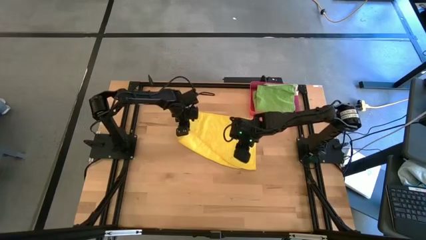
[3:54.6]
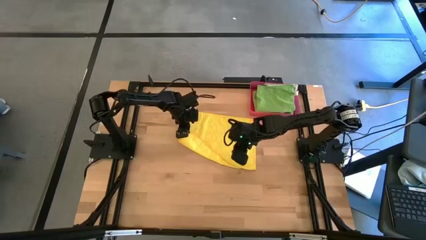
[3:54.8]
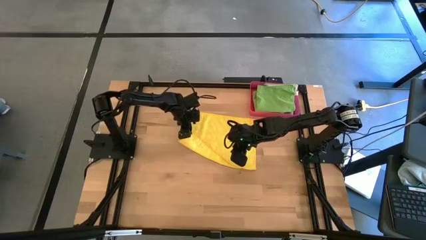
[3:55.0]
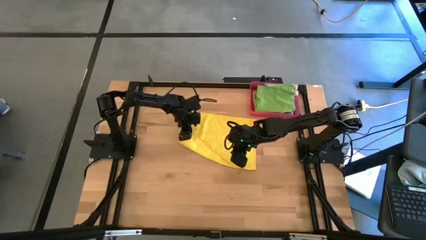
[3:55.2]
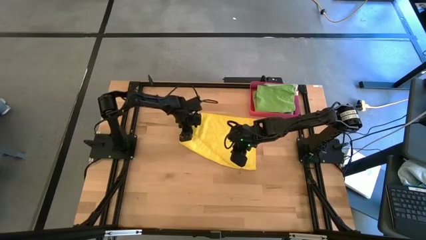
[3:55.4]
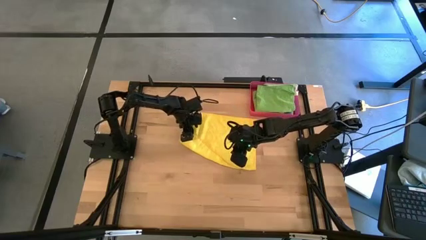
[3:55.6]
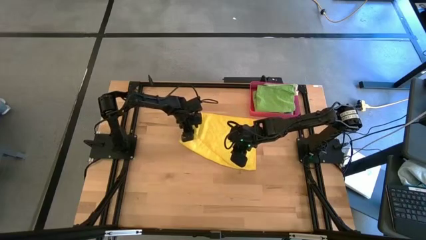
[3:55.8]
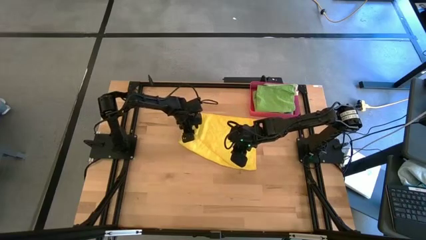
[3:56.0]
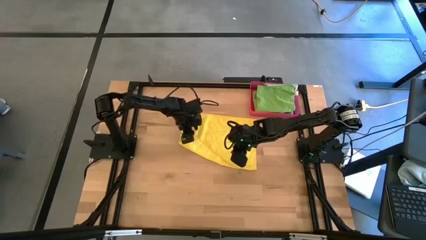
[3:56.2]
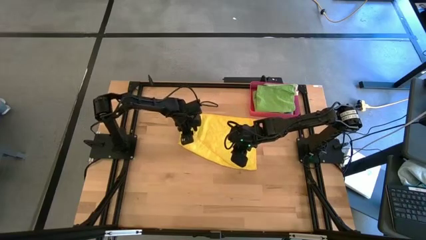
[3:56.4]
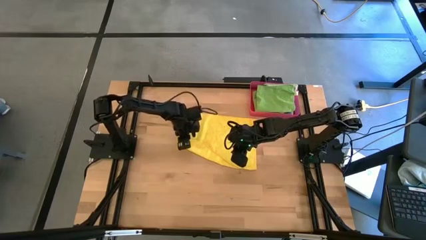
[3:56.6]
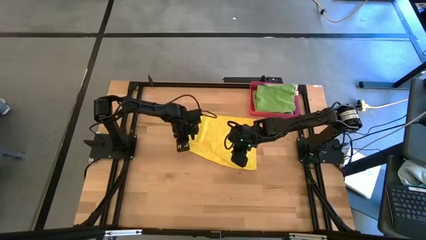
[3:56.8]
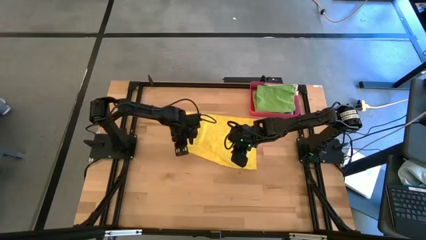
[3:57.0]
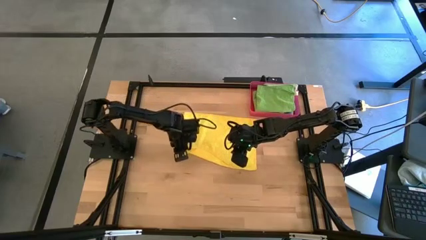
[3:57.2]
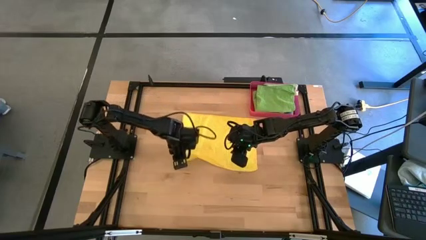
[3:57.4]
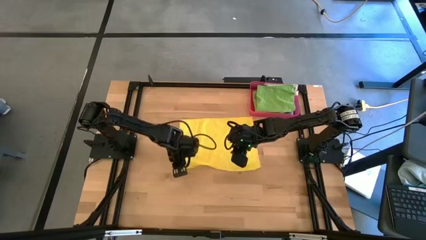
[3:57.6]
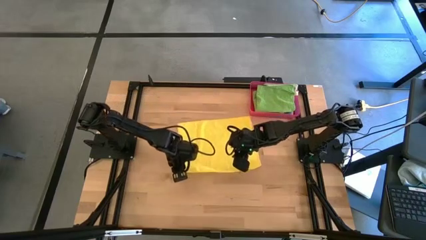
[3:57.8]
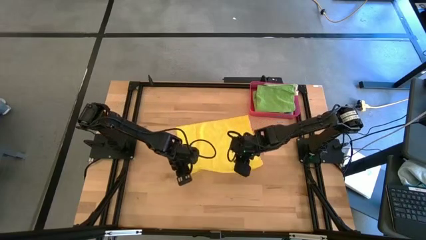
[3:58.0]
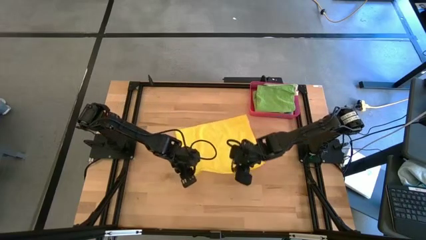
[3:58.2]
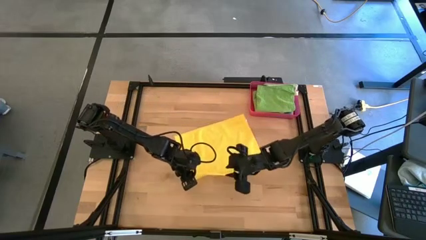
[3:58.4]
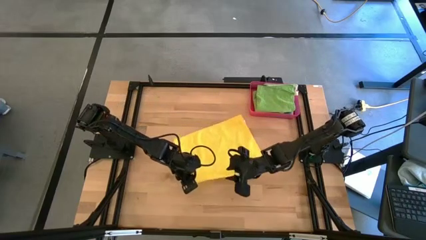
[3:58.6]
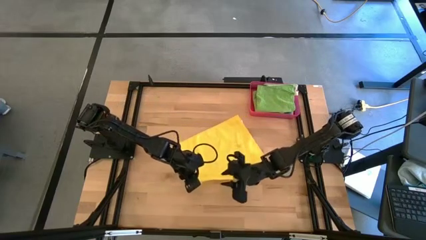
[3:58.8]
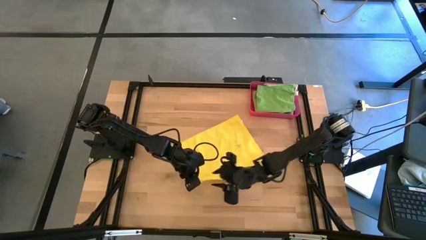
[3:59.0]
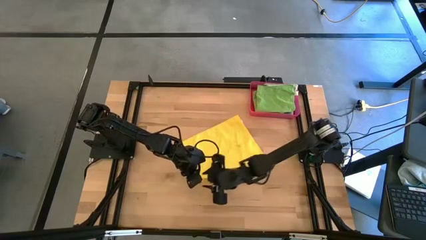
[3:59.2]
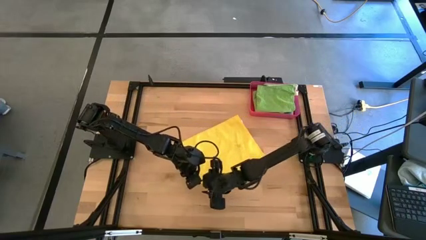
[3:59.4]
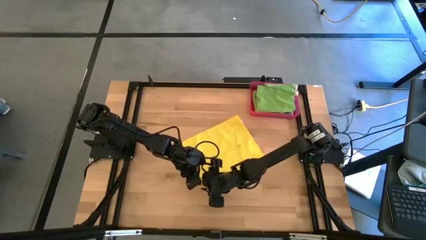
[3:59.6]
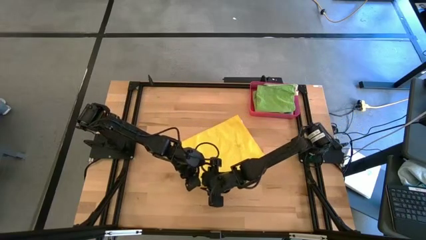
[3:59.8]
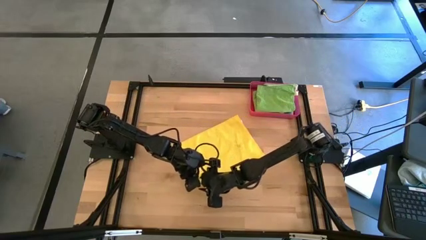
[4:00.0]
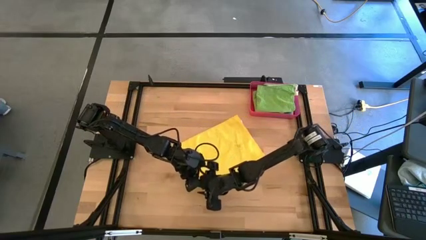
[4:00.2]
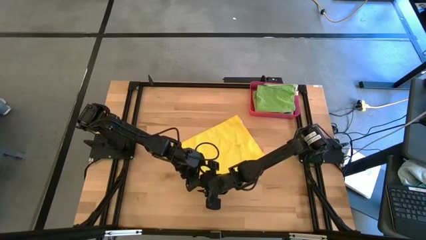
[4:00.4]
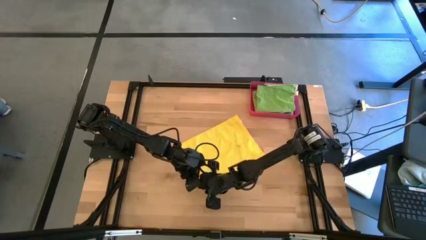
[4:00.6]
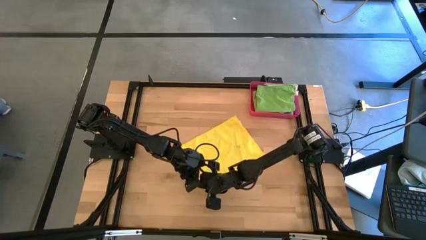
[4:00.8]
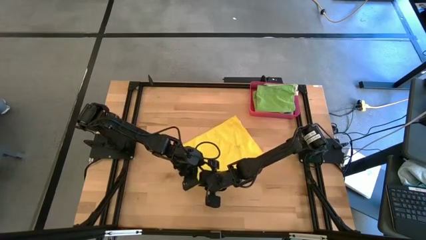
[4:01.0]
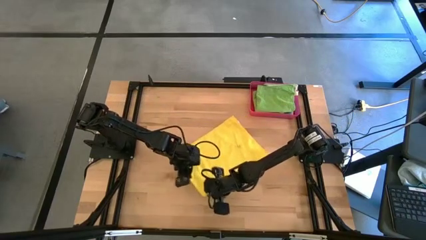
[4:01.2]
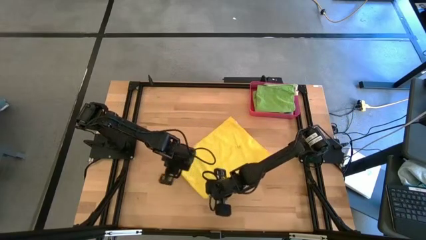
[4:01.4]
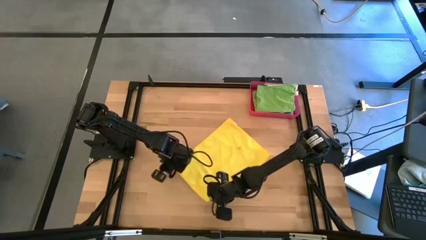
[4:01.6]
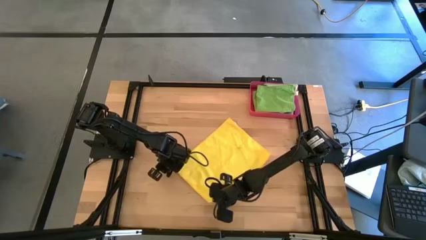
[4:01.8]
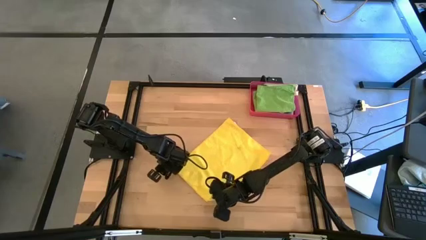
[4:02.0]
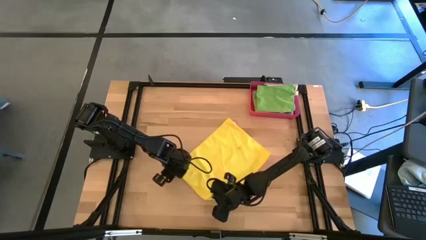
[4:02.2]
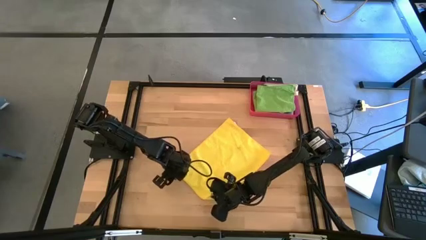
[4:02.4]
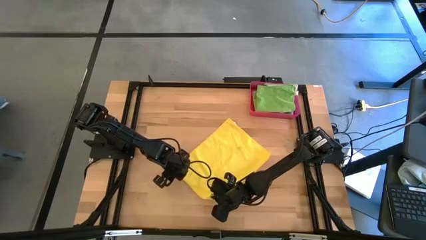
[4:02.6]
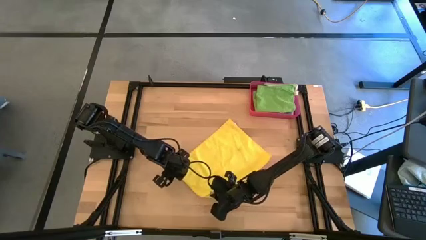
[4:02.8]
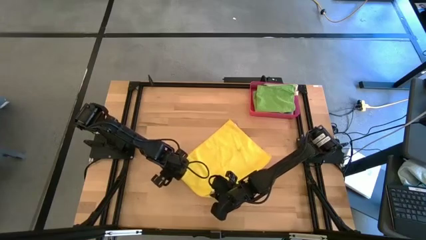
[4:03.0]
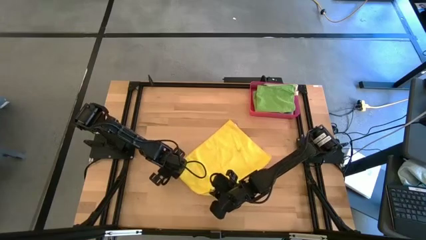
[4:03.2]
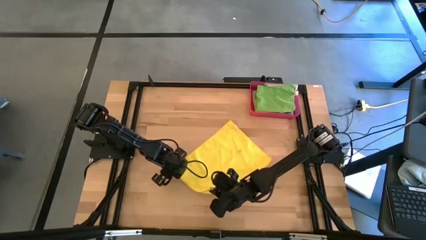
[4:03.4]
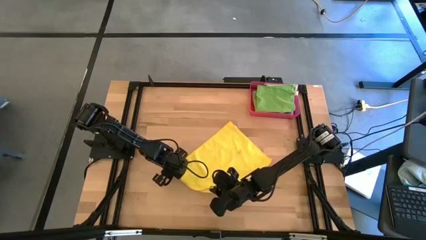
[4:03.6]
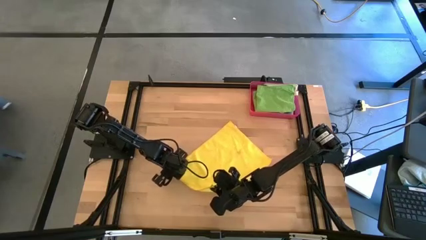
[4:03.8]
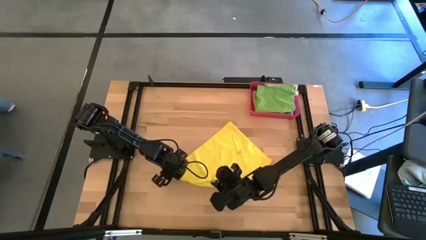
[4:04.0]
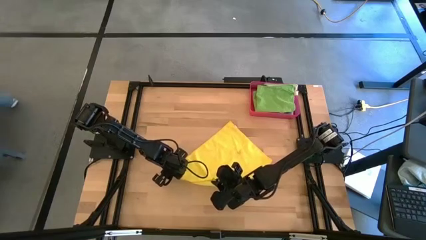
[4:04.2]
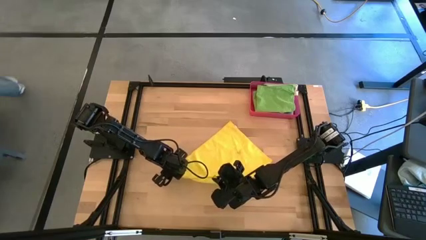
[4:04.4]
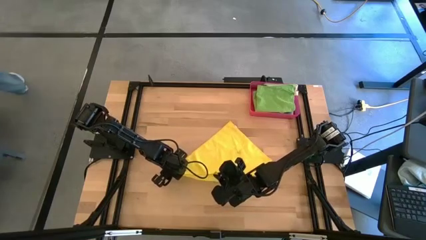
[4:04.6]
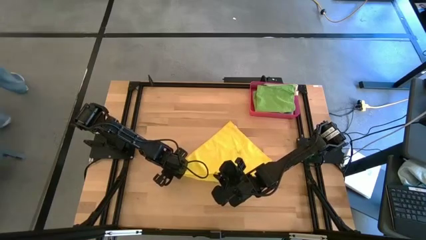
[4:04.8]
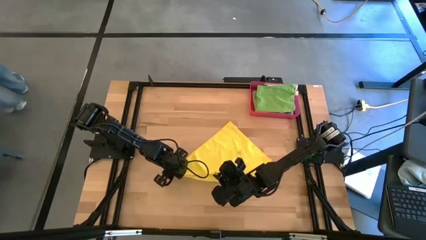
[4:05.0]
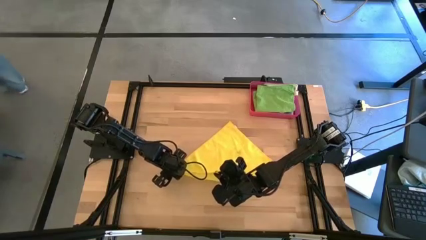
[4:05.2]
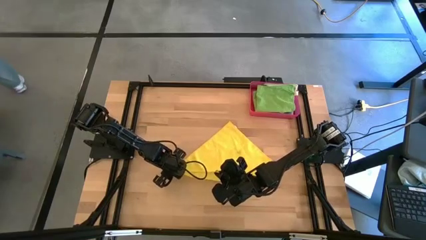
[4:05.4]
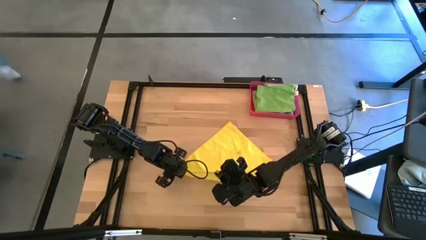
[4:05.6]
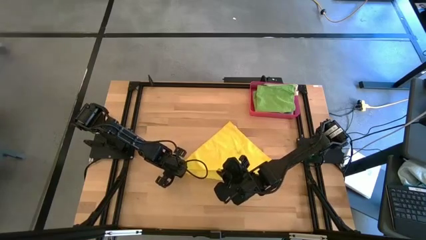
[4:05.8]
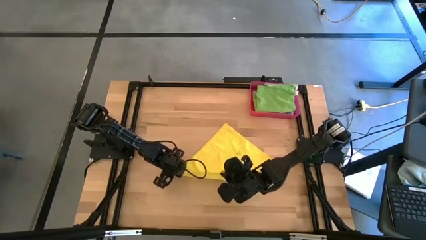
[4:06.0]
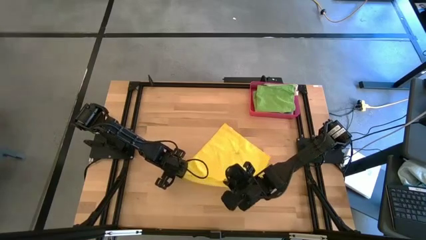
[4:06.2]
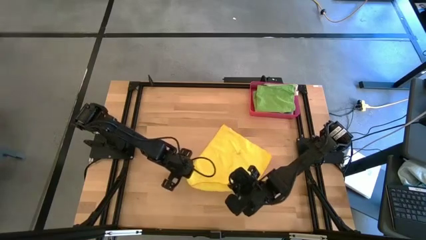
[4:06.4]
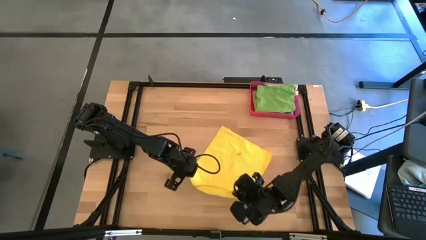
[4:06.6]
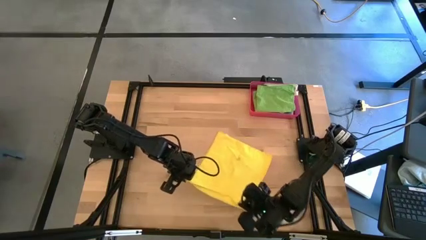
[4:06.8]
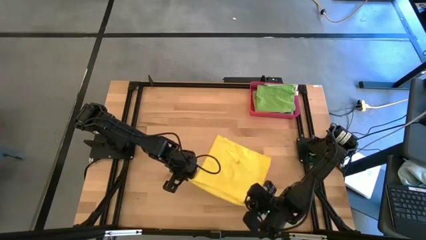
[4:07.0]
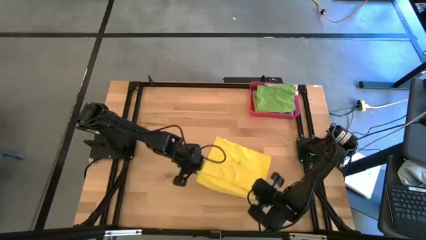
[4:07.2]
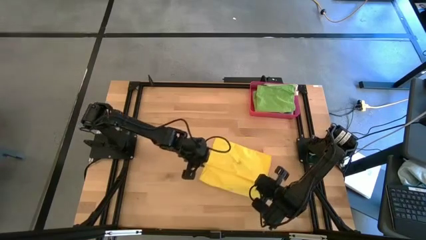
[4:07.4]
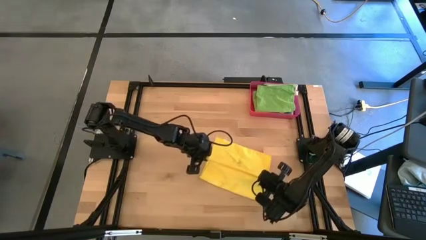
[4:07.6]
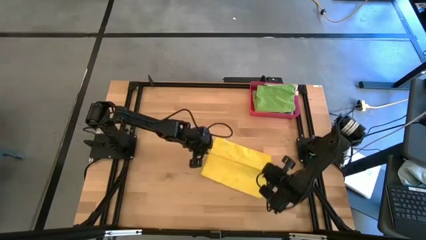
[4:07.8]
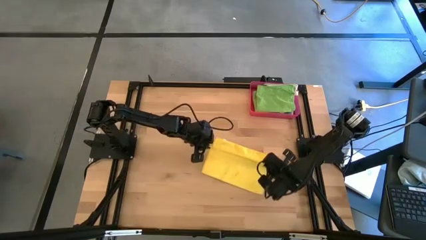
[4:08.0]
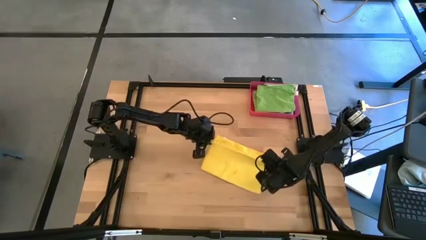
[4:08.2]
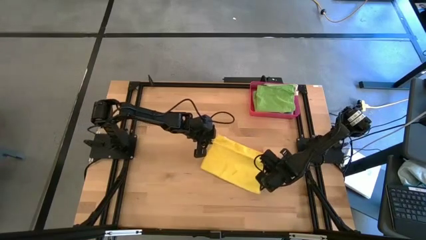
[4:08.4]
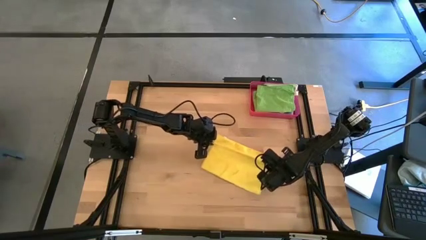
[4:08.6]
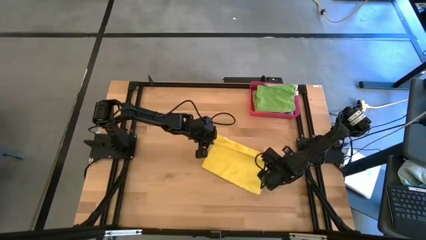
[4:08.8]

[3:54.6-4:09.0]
Task: Fold microfiber towels
Fold the yellow towel

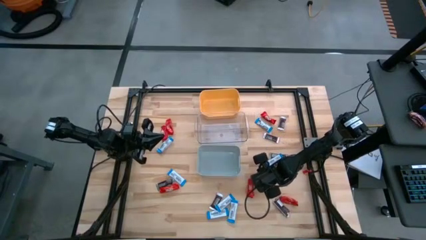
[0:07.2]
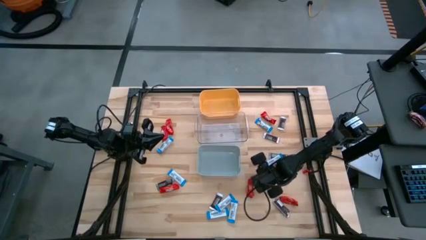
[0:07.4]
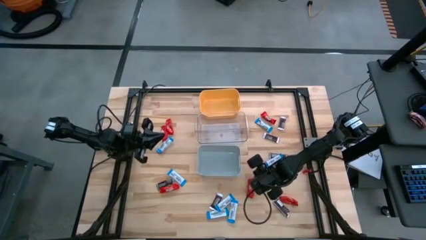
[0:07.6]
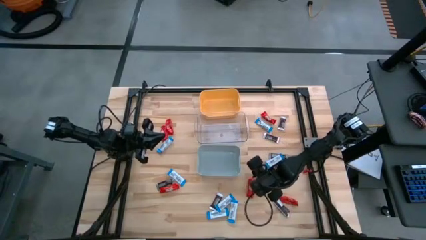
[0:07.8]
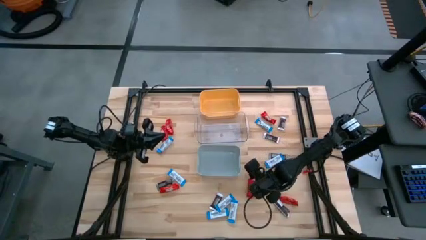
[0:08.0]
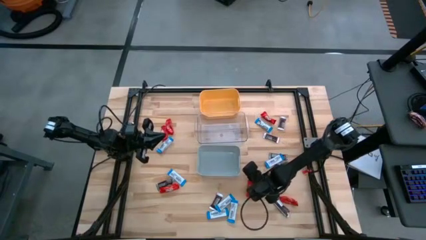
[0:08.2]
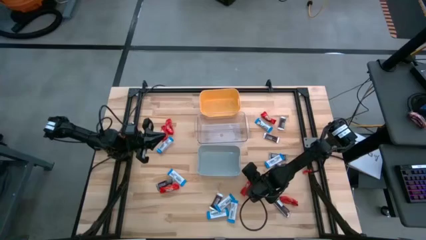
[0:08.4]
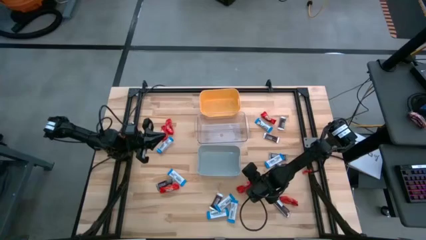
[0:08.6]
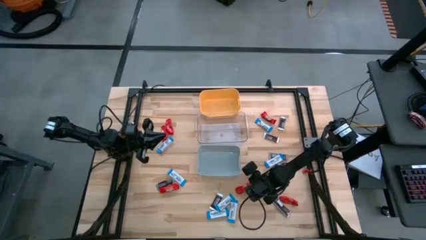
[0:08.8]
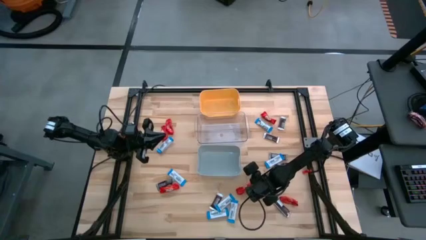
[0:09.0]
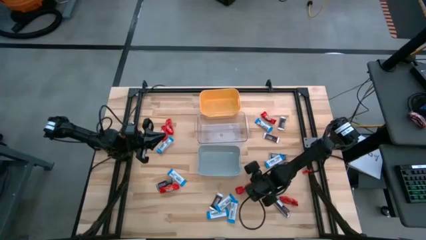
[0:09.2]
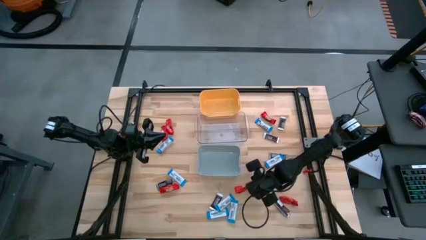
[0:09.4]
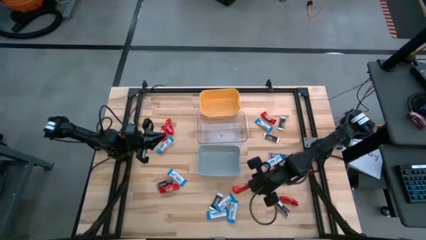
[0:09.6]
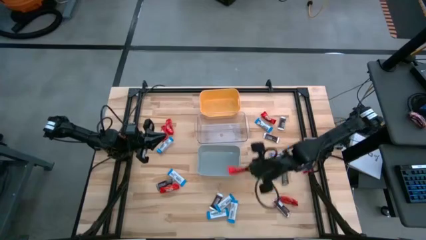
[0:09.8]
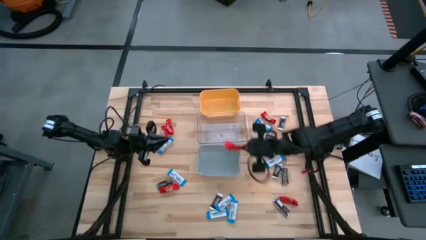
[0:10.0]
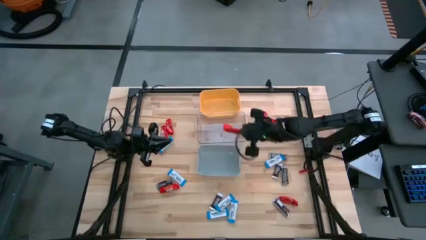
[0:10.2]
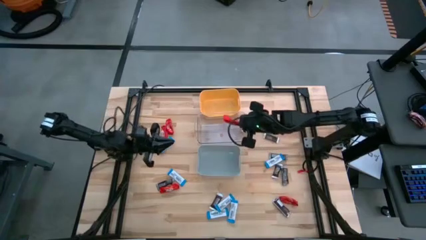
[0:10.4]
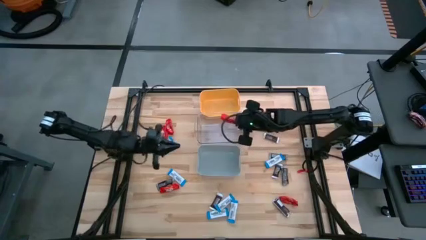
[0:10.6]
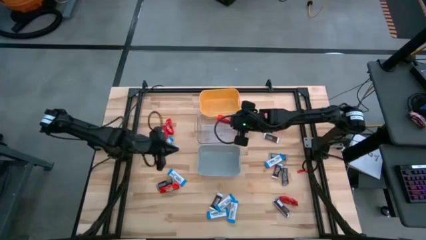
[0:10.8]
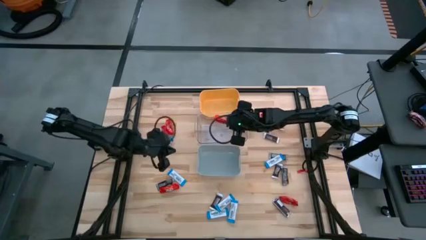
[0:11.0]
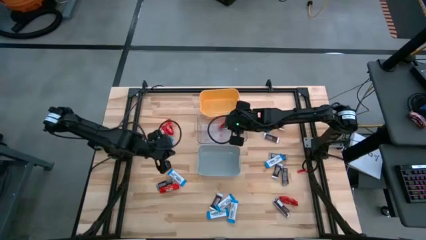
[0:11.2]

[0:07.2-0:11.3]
Task: Organize candy in baskets
Put the red chocolate bar into the transparent bin
